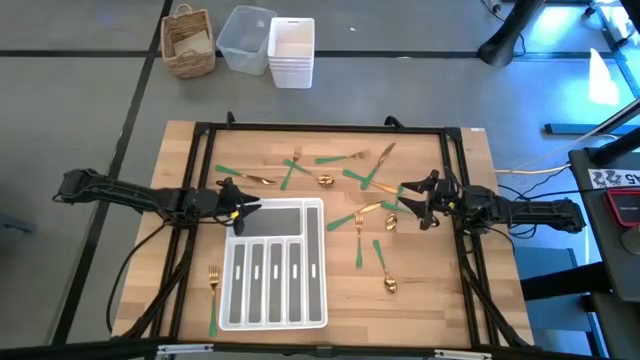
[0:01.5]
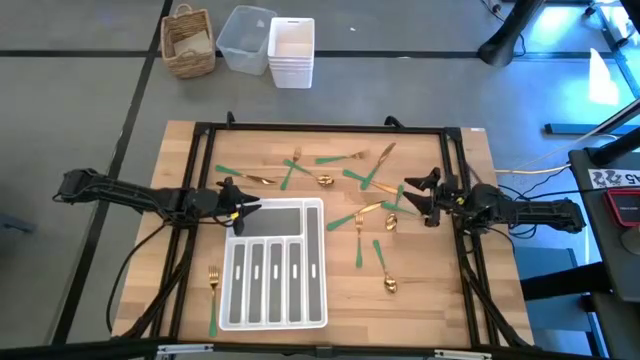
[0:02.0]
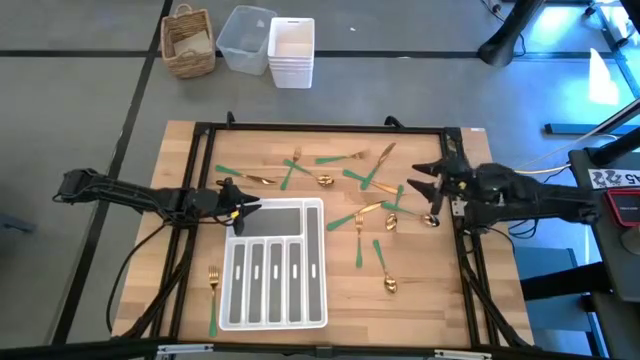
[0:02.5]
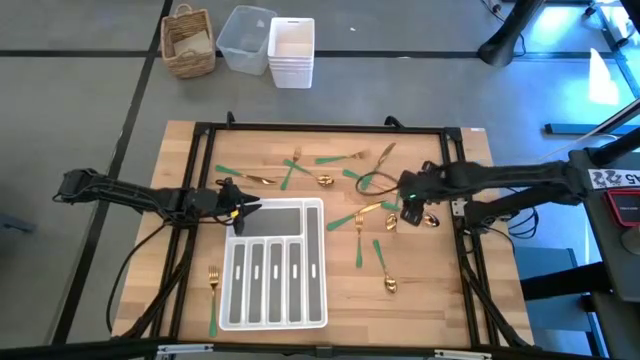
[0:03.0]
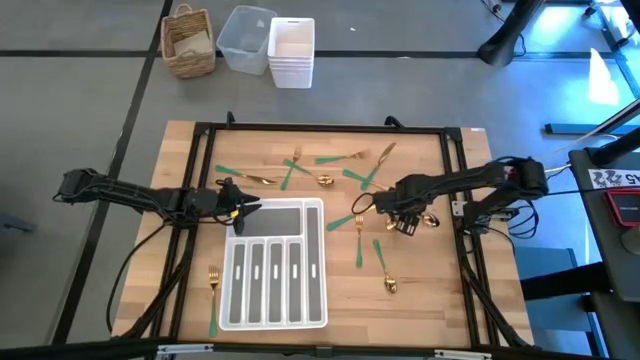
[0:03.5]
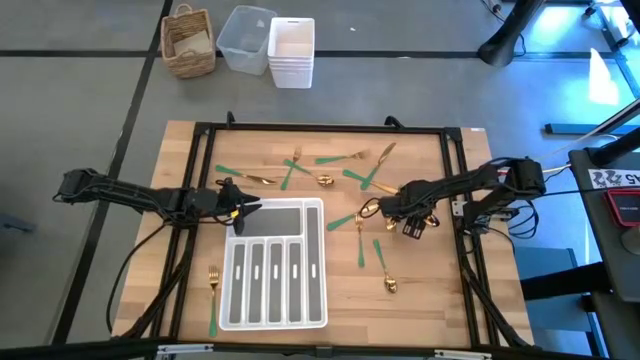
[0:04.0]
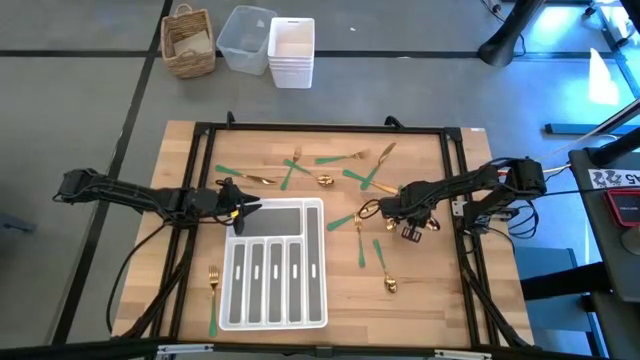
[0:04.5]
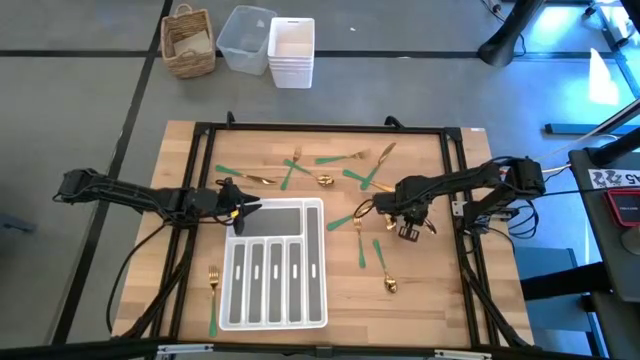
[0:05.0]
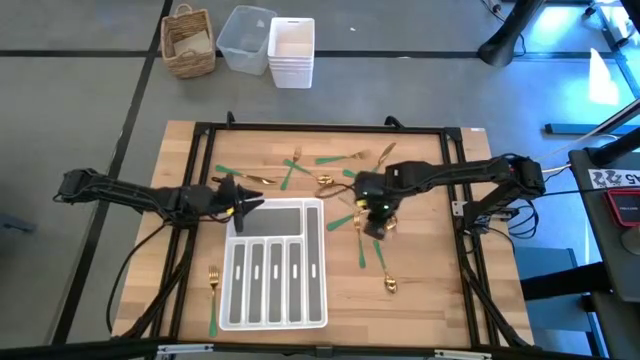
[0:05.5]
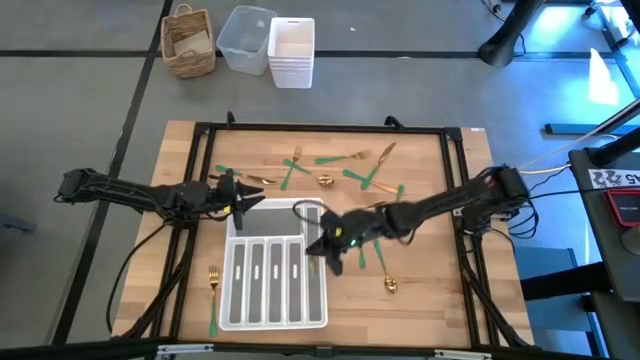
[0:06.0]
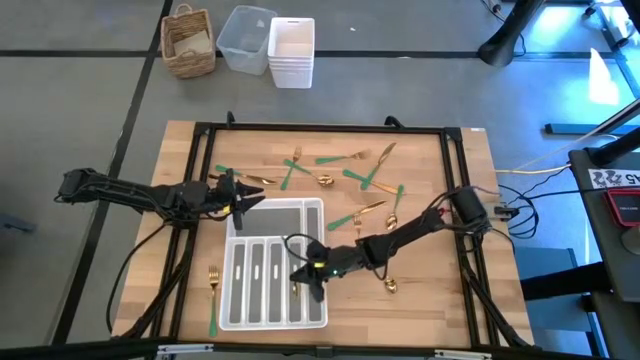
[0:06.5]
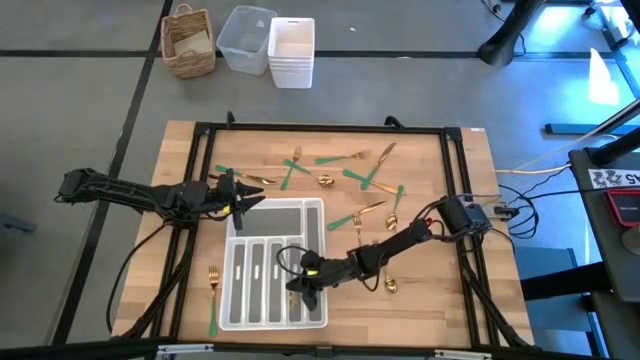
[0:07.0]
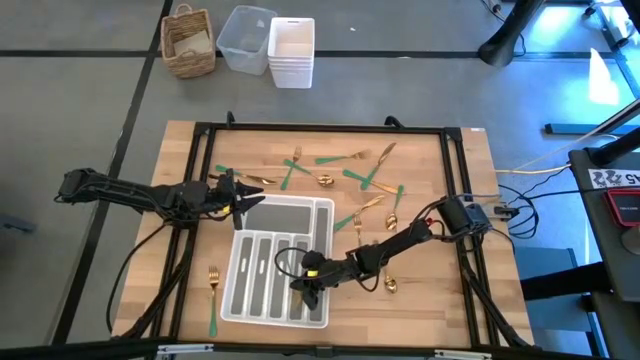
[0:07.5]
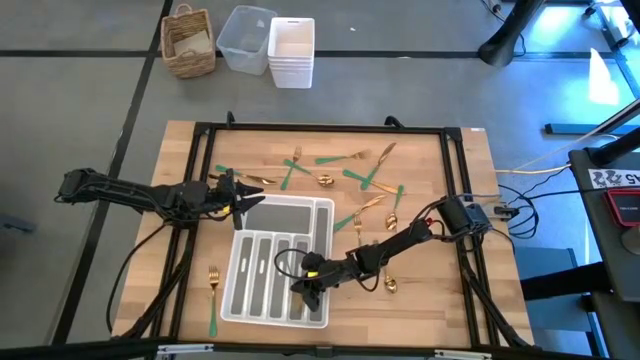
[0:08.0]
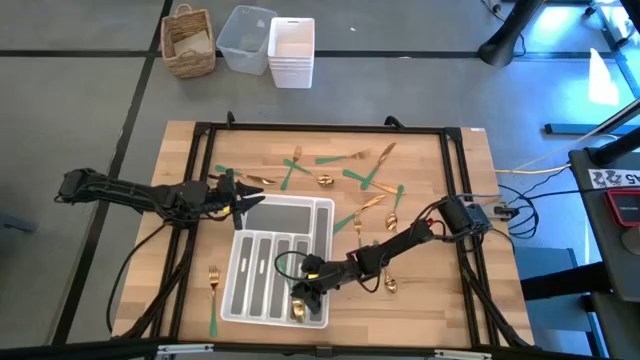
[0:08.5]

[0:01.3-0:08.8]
Task: Sort silverware
Put the spoon in the silverware tray

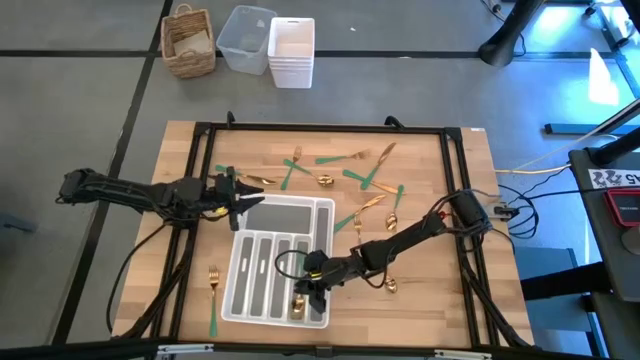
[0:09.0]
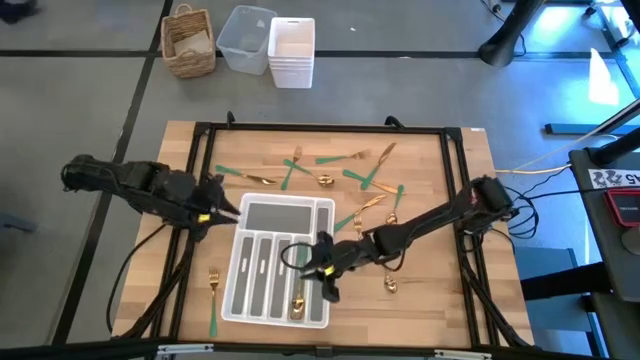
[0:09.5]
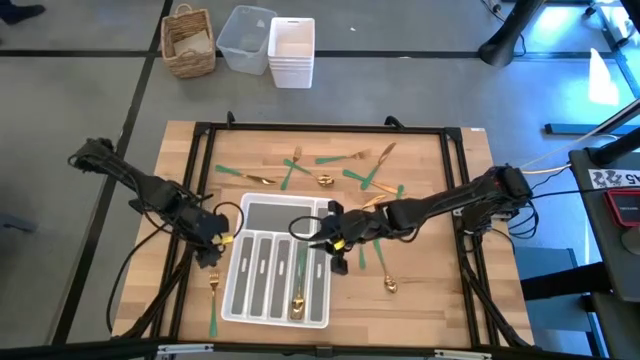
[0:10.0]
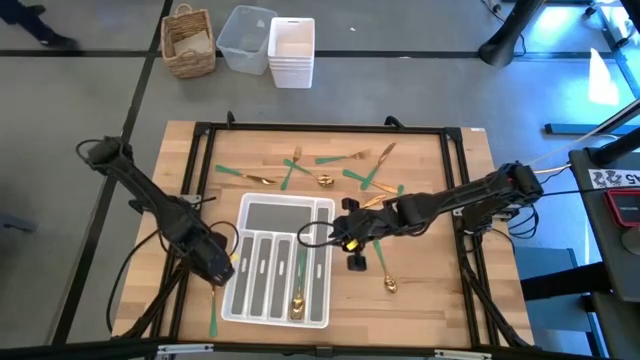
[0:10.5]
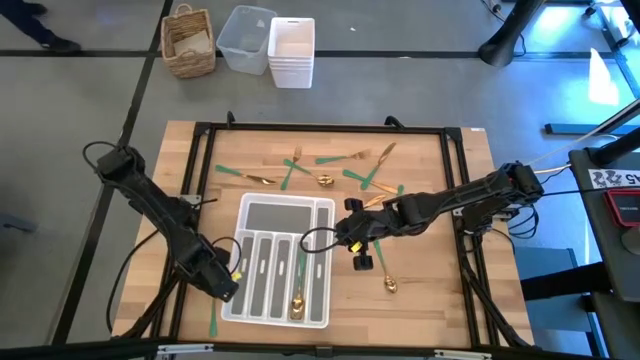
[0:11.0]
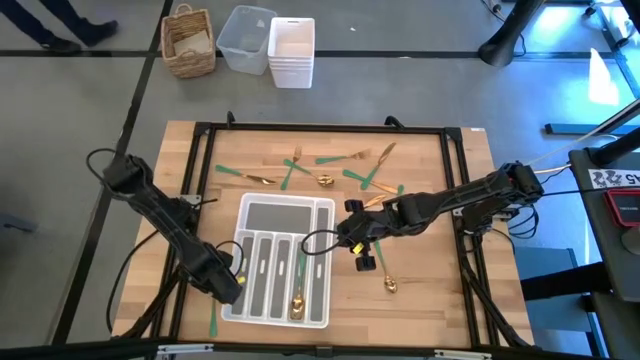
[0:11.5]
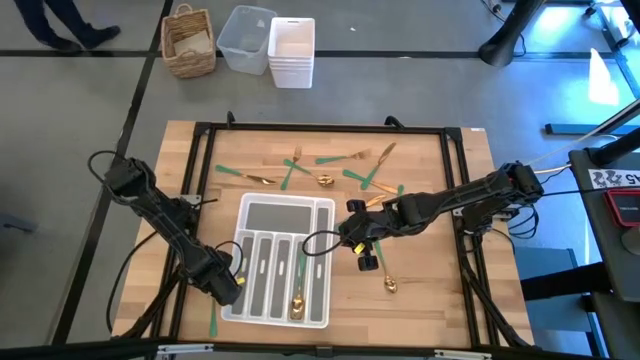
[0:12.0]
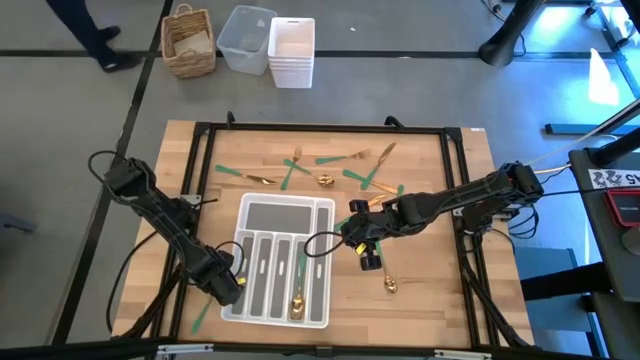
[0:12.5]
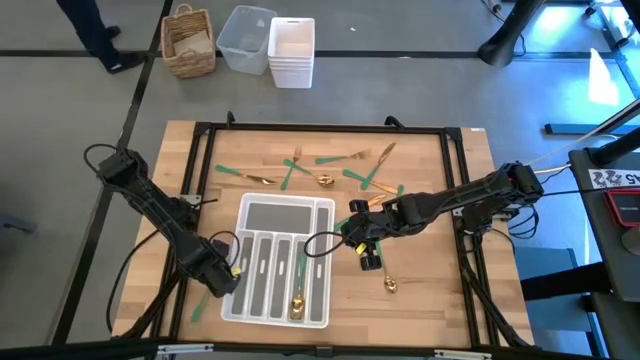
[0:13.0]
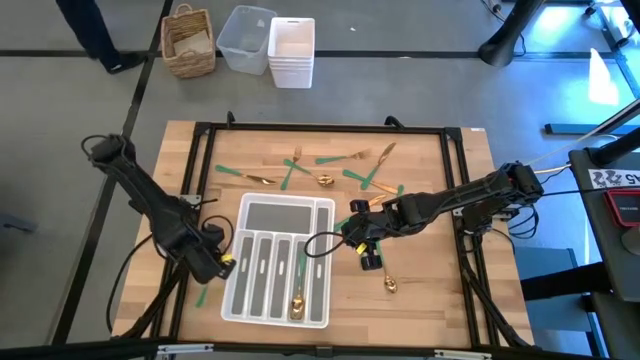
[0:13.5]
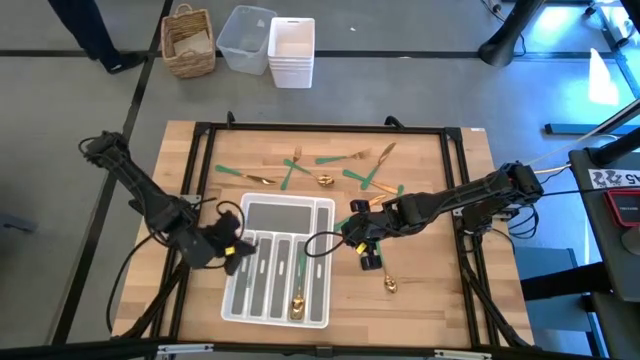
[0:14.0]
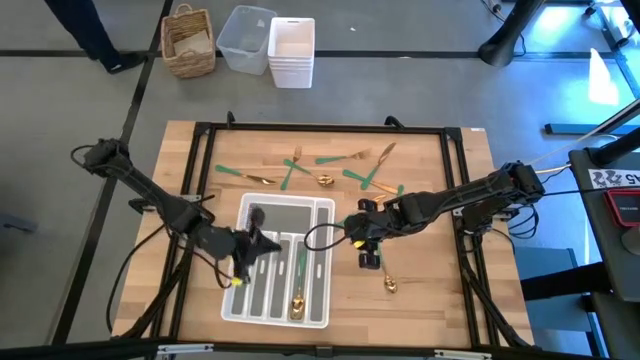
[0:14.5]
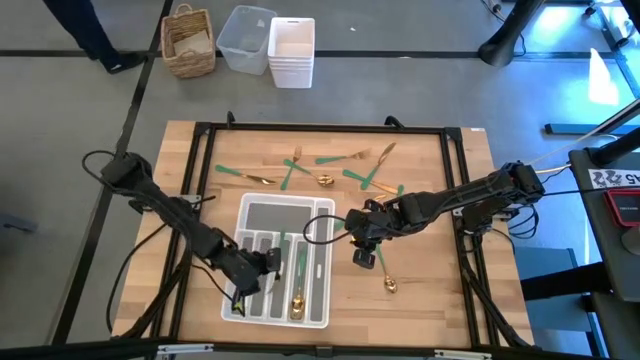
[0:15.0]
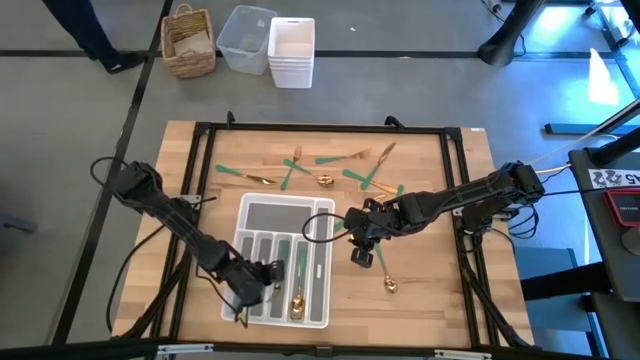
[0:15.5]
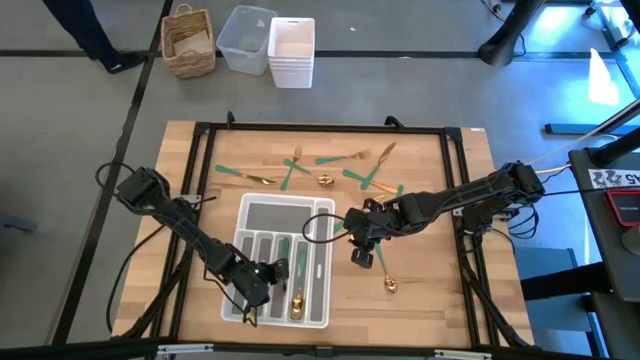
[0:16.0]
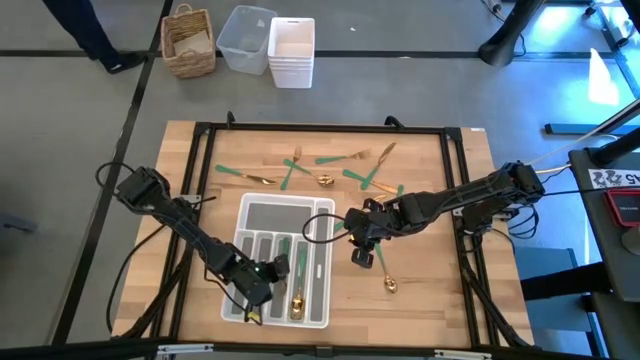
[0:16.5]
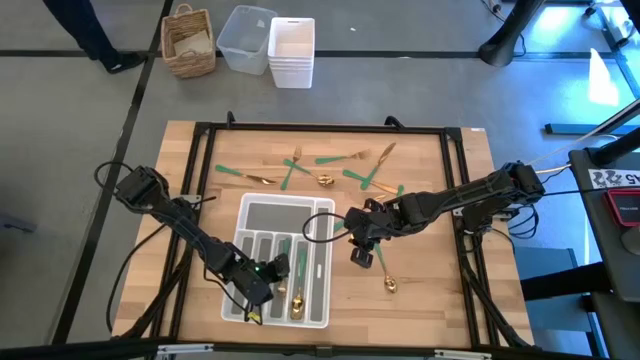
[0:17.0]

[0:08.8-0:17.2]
Put the fork in the silverware tray

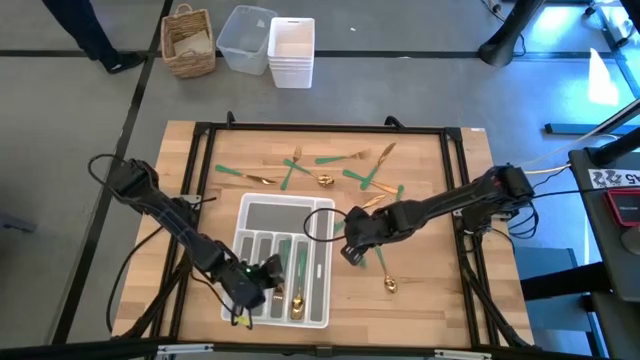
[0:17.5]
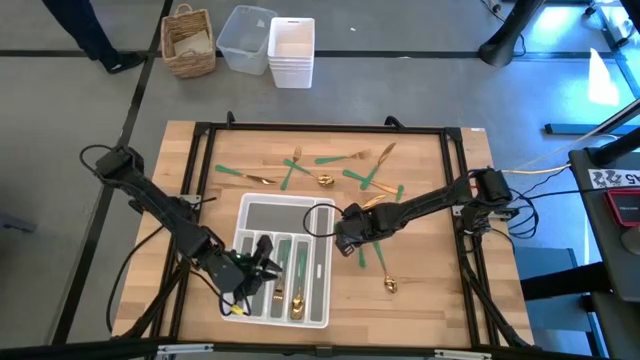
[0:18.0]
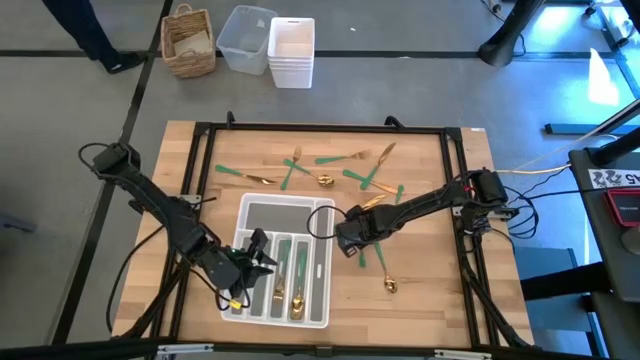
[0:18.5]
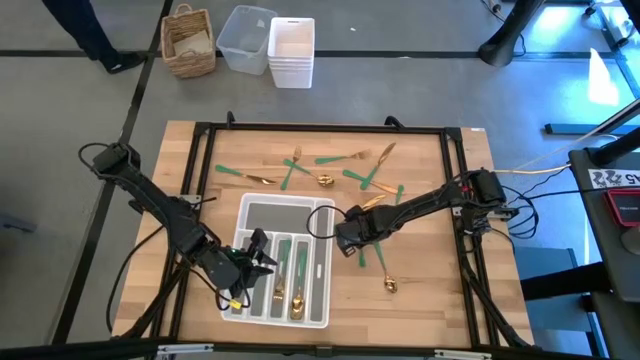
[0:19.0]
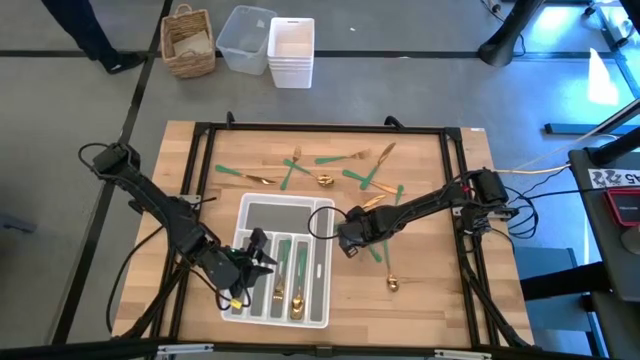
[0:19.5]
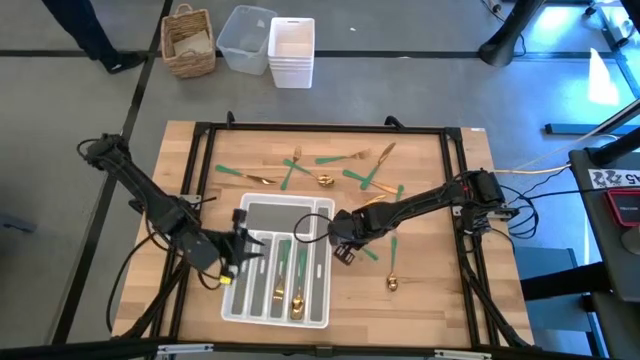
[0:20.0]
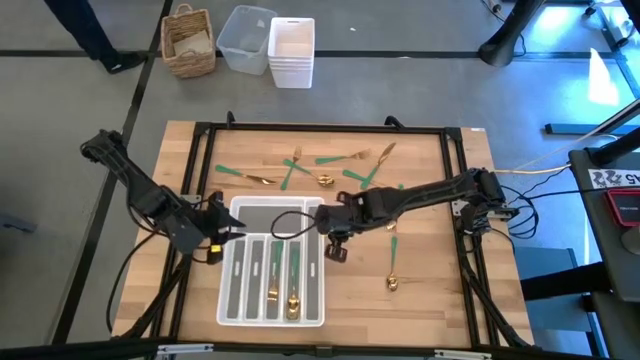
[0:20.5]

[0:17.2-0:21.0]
Put the fork in the silverware tray

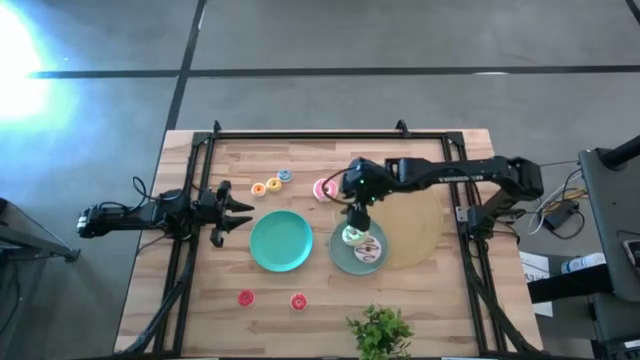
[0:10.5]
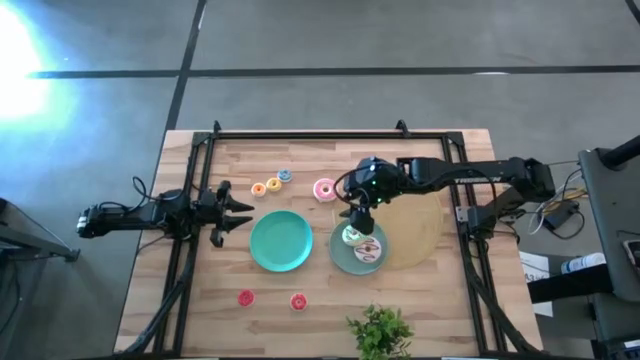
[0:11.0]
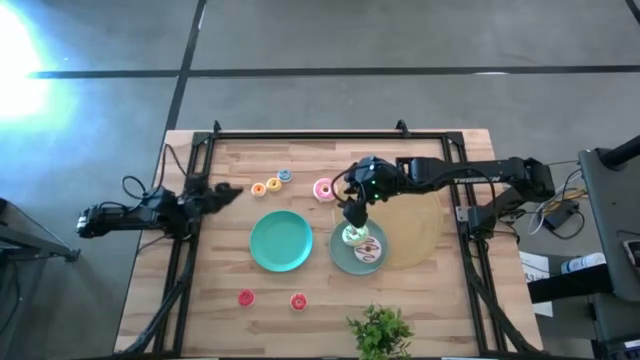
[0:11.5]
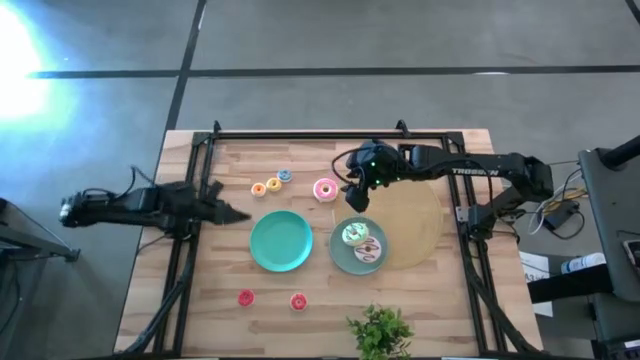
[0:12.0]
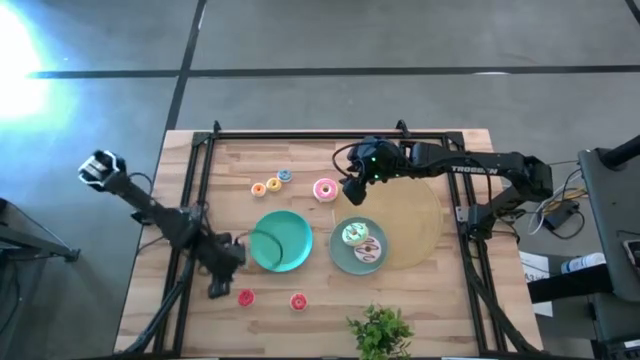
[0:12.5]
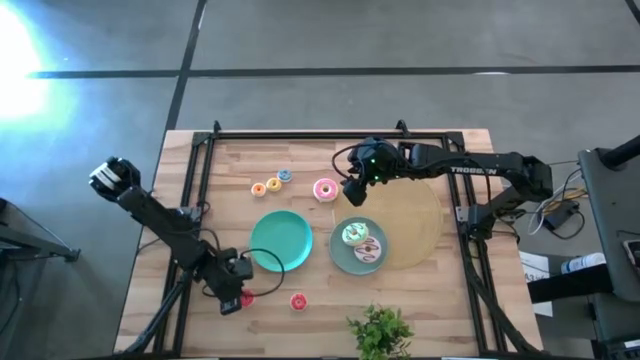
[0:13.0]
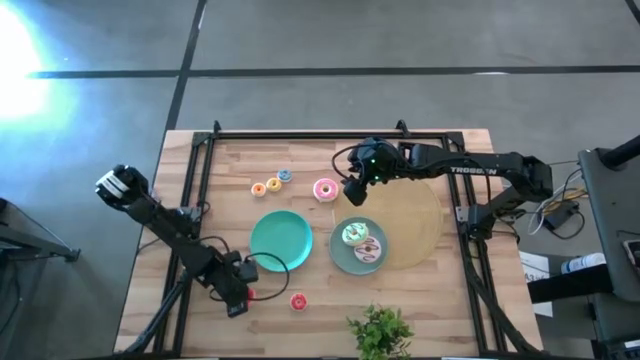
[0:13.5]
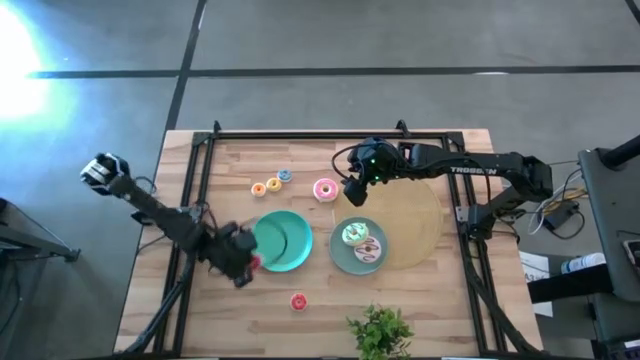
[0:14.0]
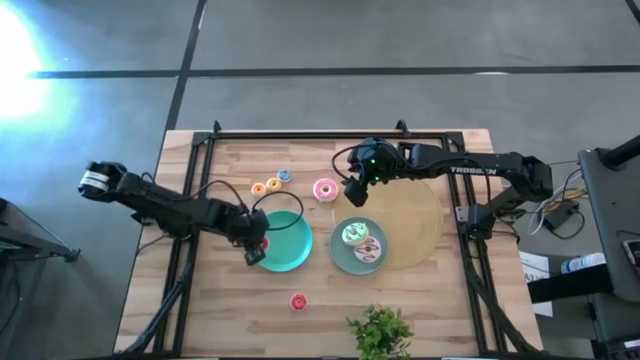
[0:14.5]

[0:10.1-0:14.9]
Task: Pick & Place donuts
Put the small red donut on the blue plate
